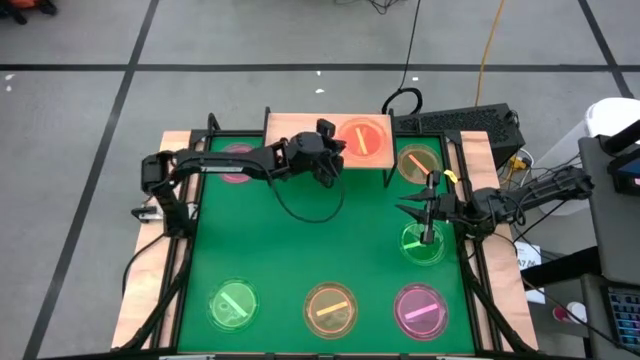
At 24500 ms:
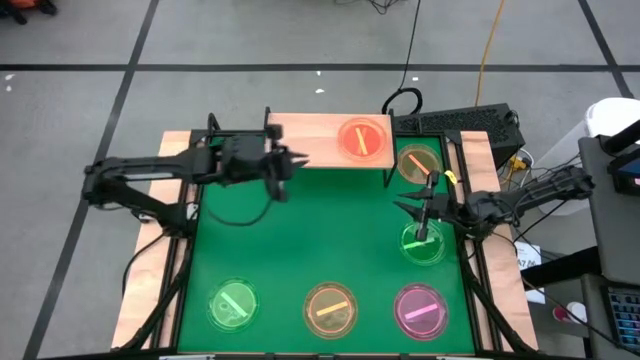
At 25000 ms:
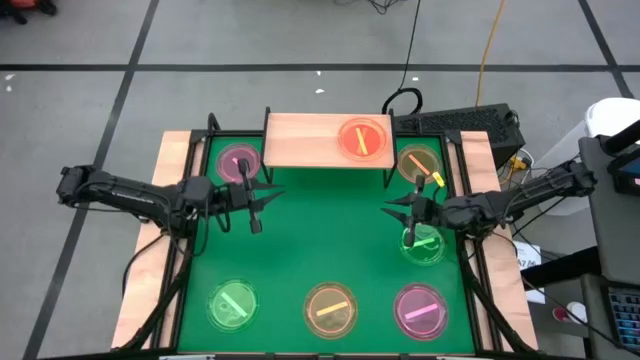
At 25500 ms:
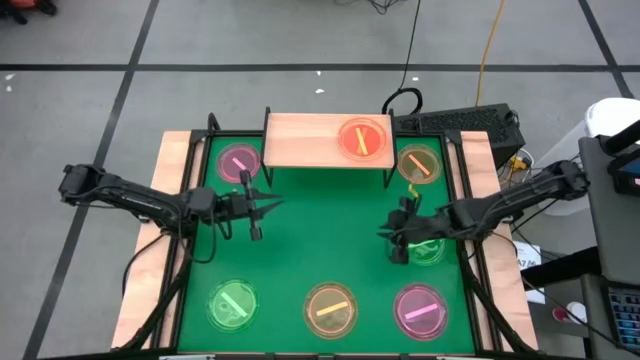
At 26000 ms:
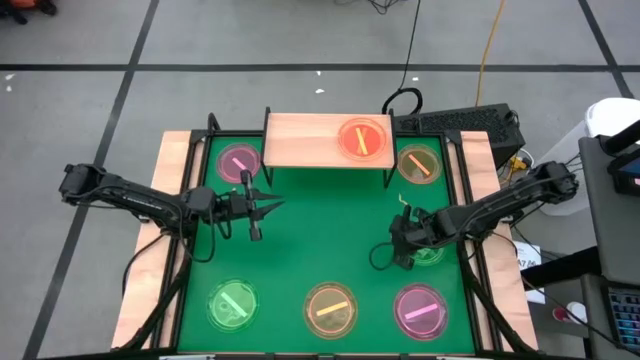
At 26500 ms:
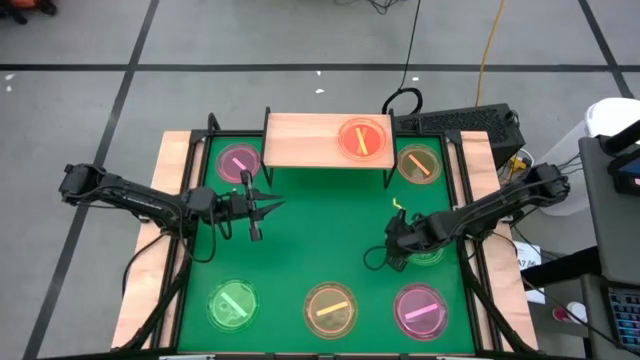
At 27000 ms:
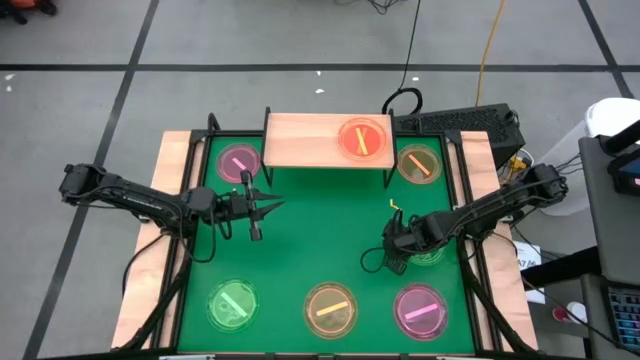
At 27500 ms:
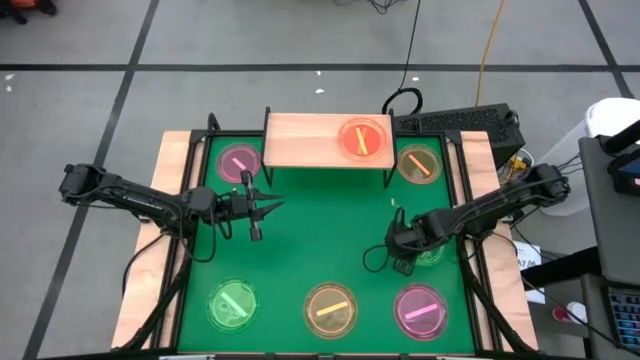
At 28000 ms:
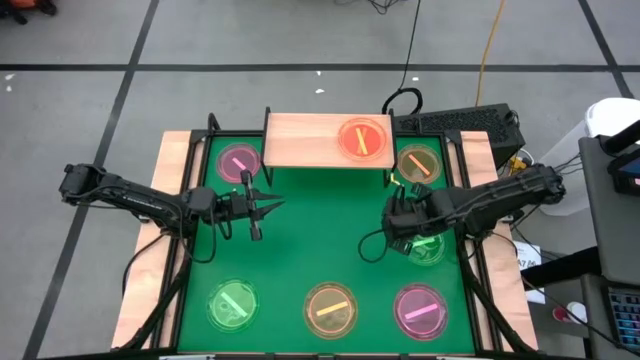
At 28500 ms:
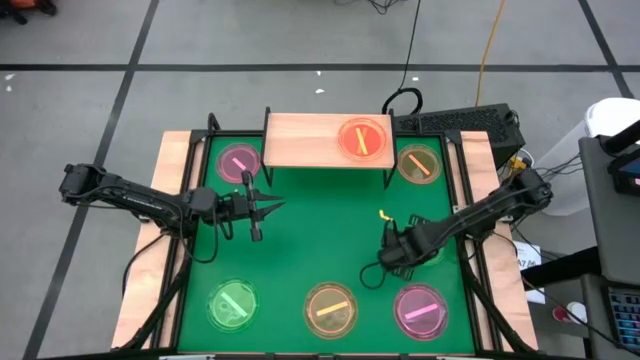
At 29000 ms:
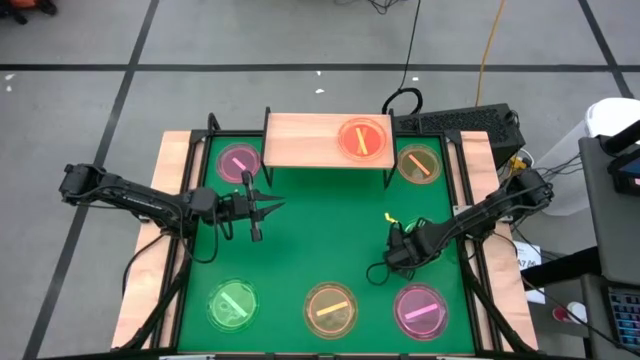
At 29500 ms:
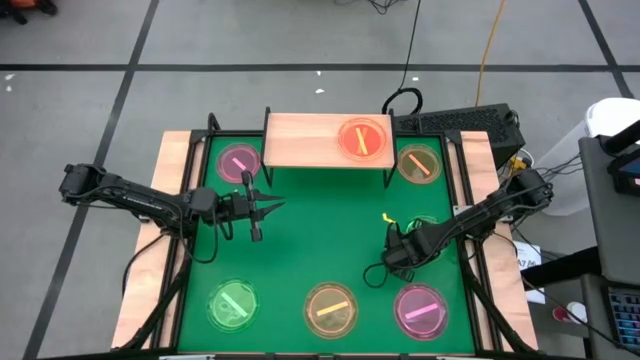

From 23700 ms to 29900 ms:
Task: Place and stack plates onto a shelf
Stack the right green plate on top of the orange plate on the shelf

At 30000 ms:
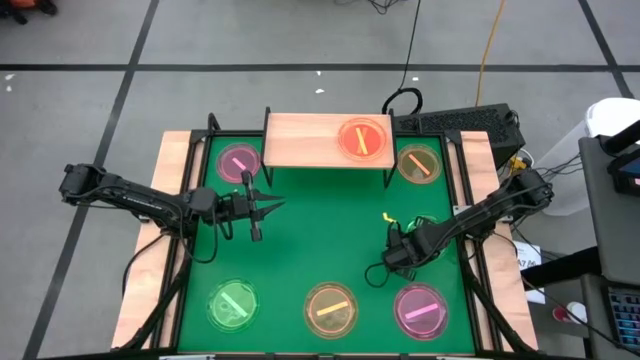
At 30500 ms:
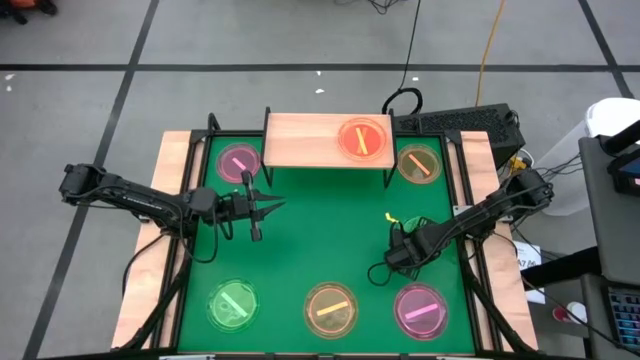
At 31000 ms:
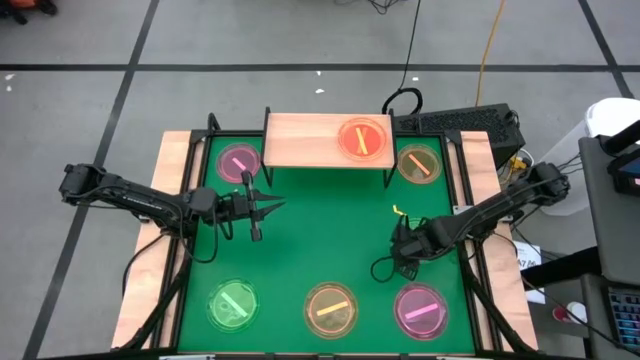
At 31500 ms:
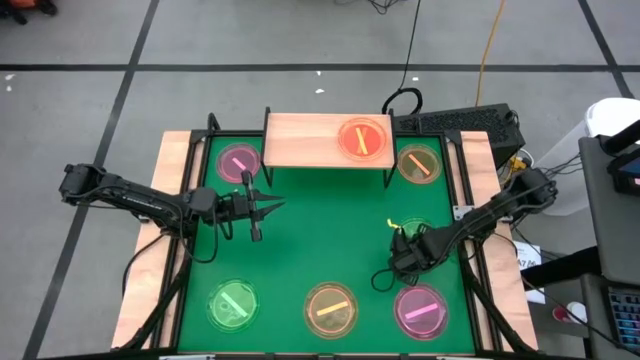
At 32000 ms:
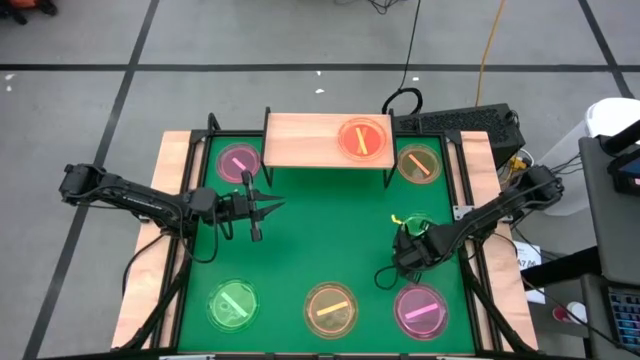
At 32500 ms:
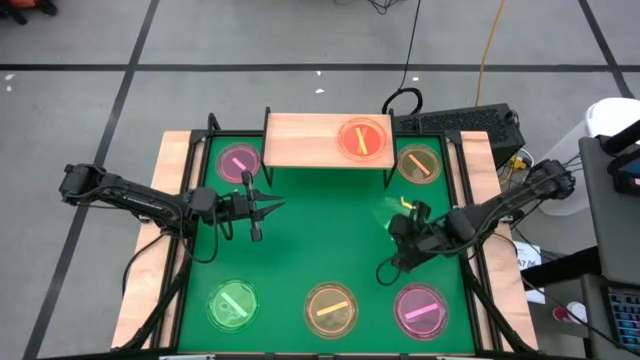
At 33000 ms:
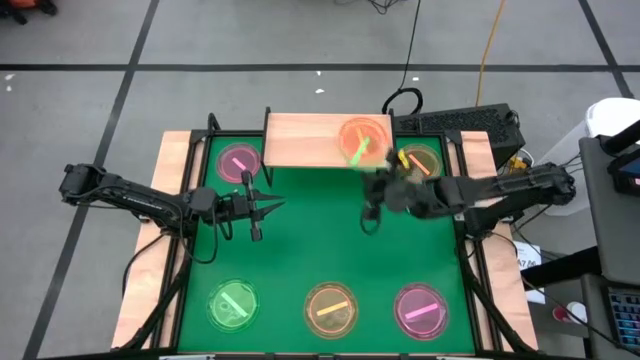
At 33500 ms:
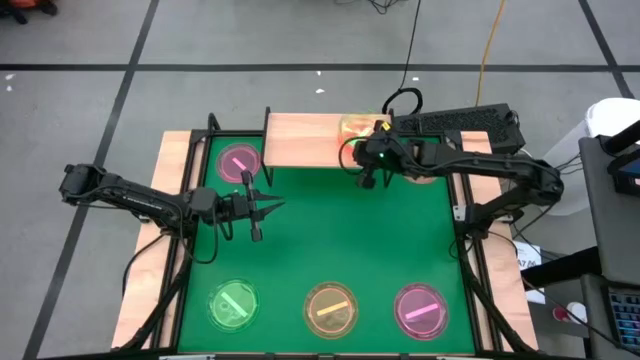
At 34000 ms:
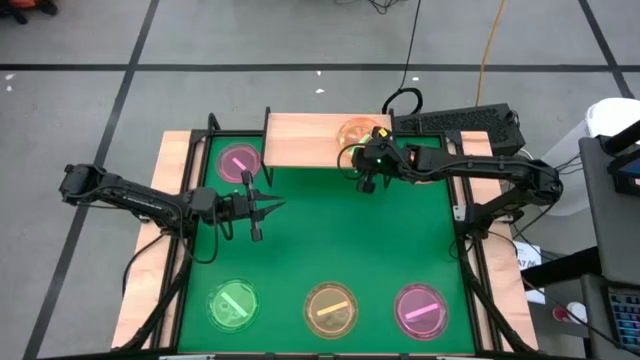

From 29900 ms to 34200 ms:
Stack the right green plate on top of the orange plate on the shelf

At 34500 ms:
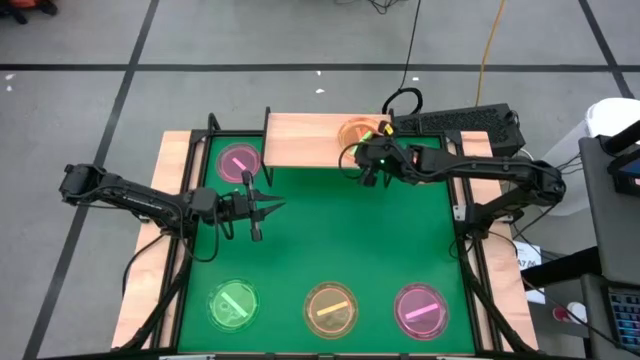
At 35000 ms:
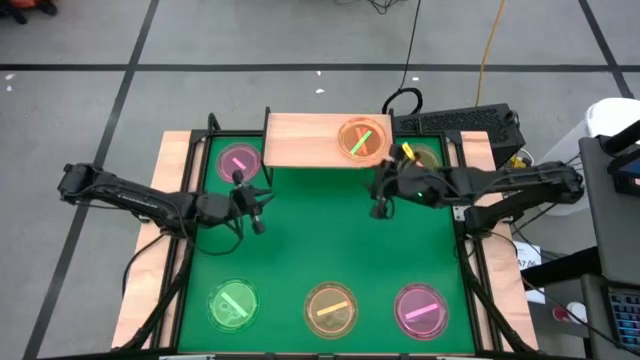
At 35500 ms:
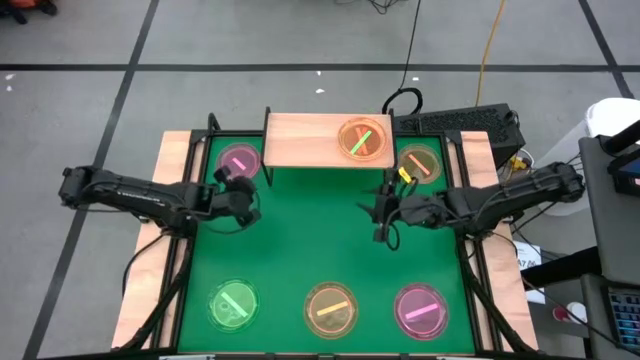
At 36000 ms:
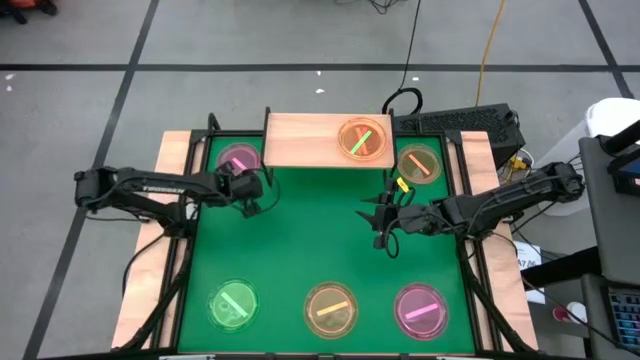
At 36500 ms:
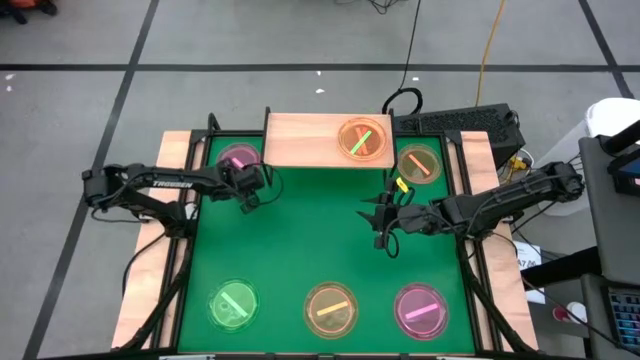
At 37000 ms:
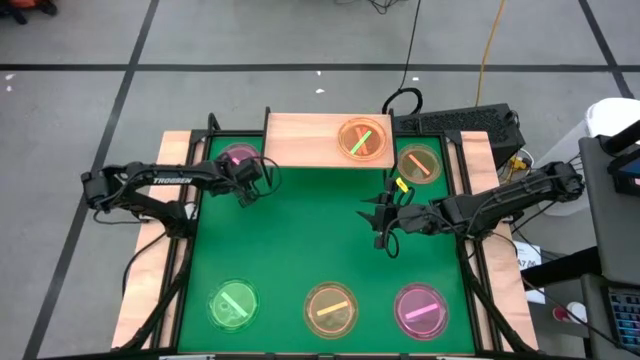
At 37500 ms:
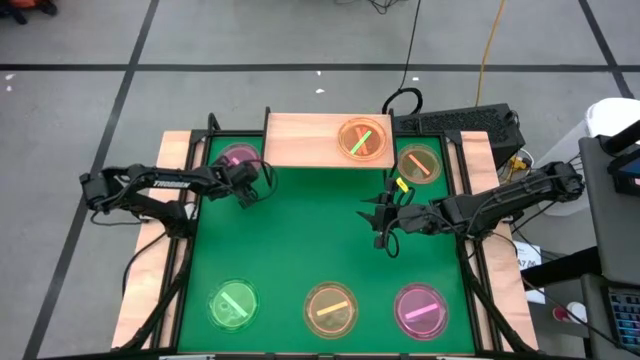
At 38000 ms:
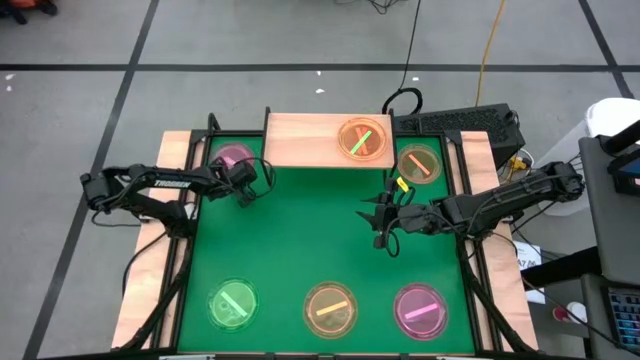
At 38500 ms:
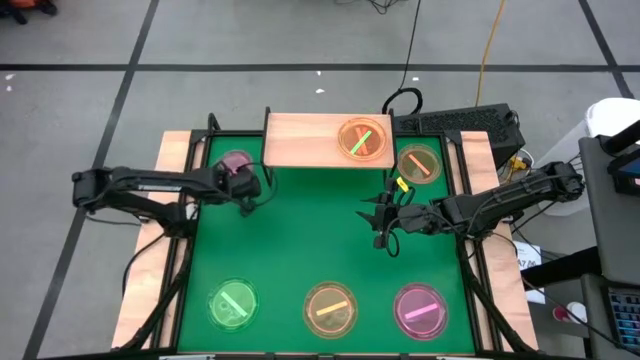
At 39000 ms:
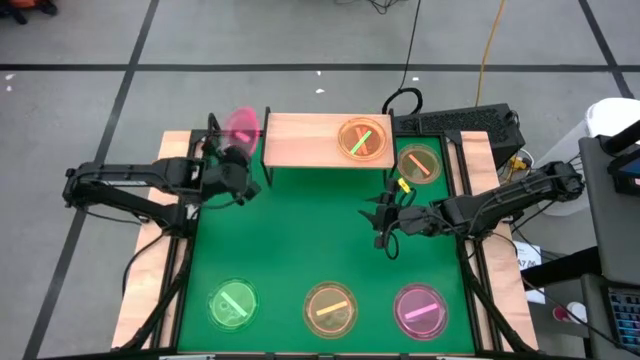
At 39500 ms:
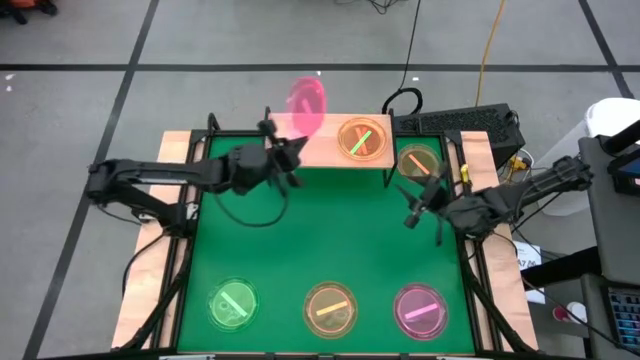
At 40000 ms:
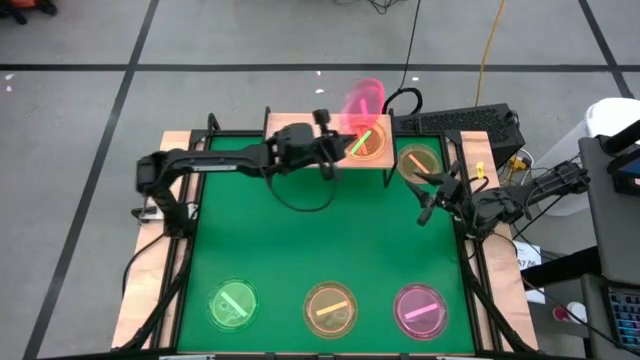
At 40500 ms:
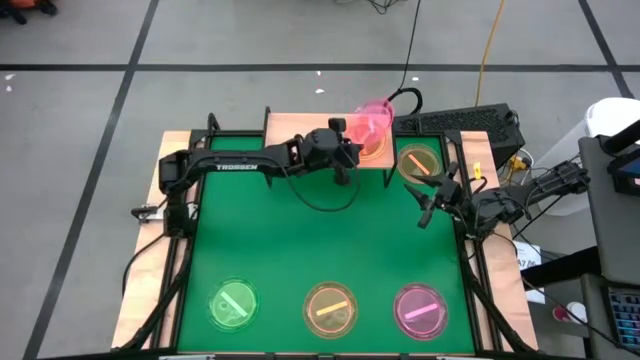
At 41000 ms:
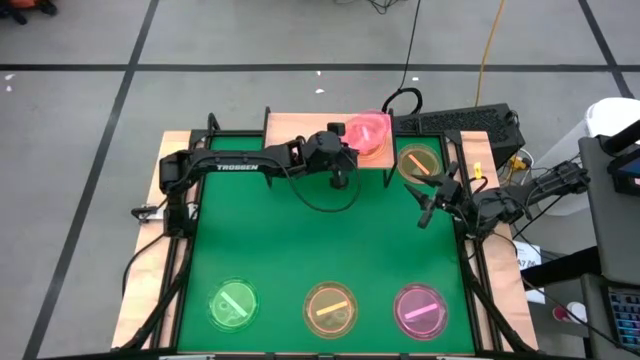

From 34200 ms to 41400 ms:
Stack the top pink plate on top of the orange plate on the shelf

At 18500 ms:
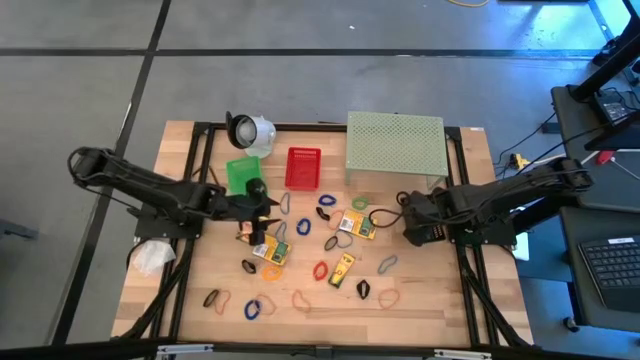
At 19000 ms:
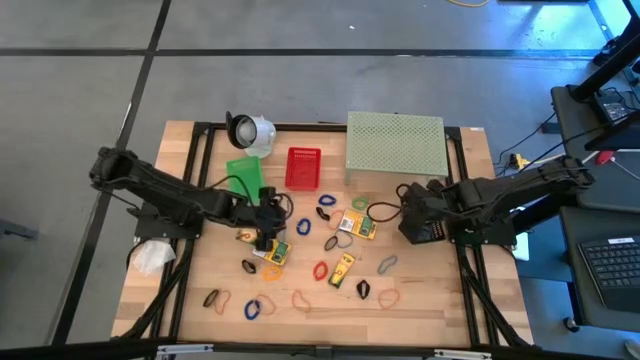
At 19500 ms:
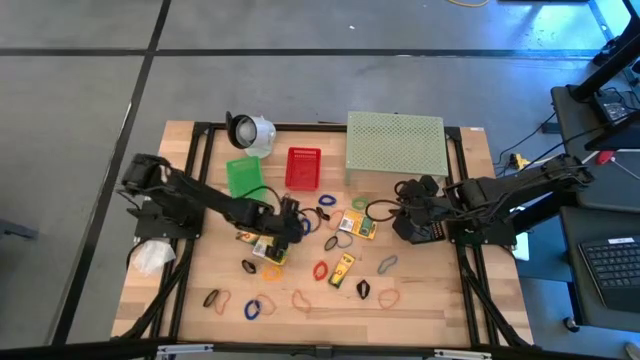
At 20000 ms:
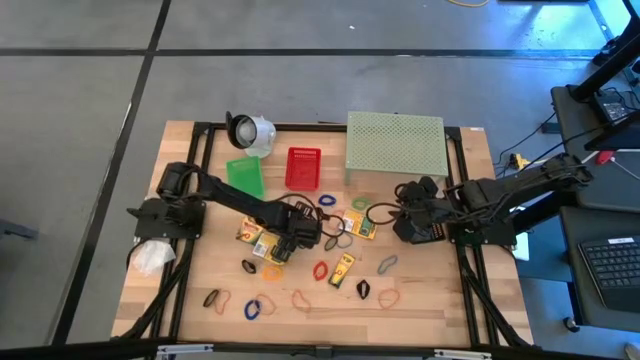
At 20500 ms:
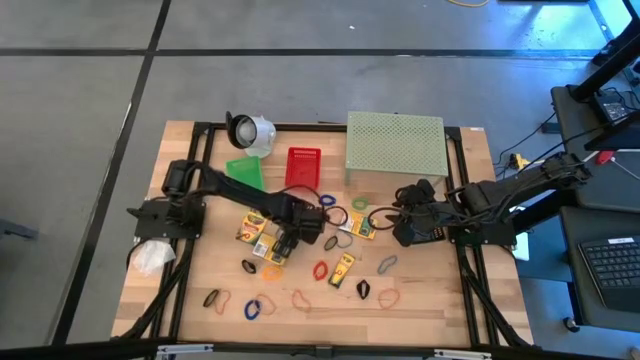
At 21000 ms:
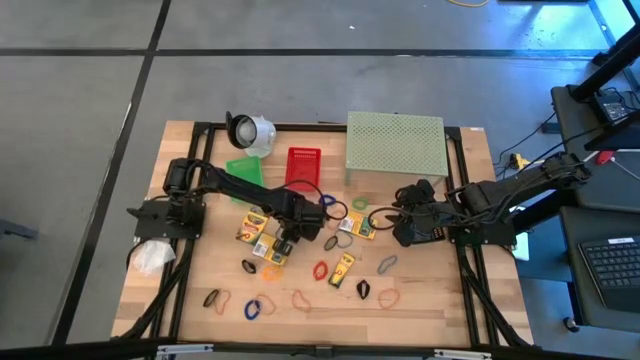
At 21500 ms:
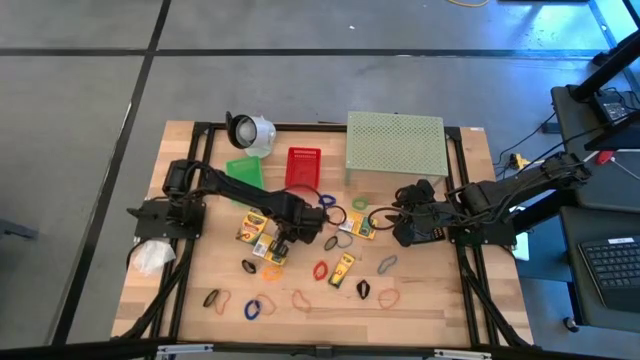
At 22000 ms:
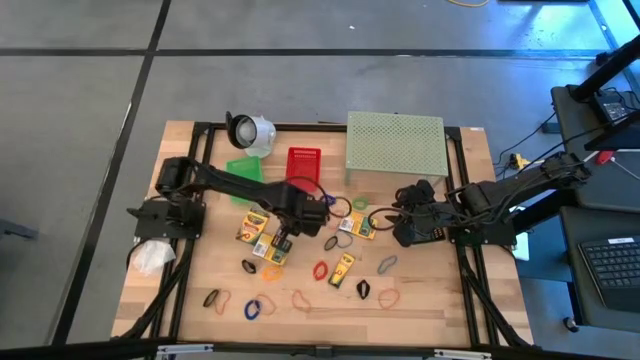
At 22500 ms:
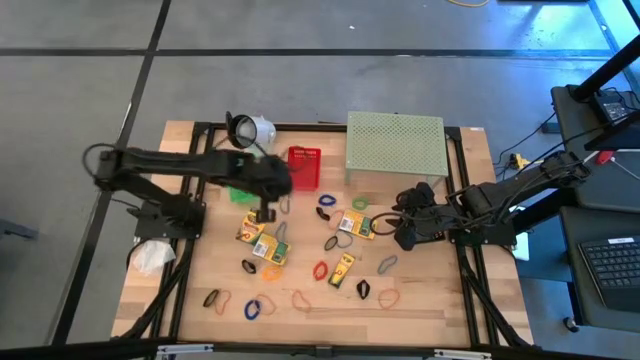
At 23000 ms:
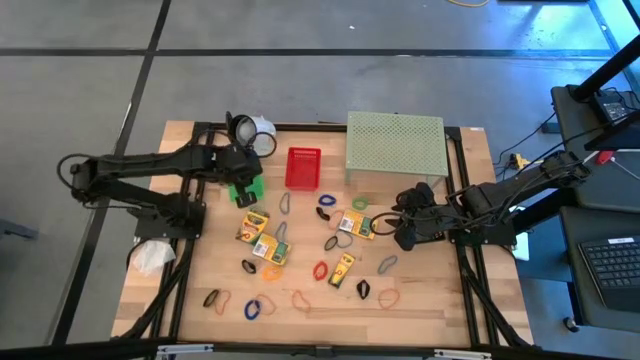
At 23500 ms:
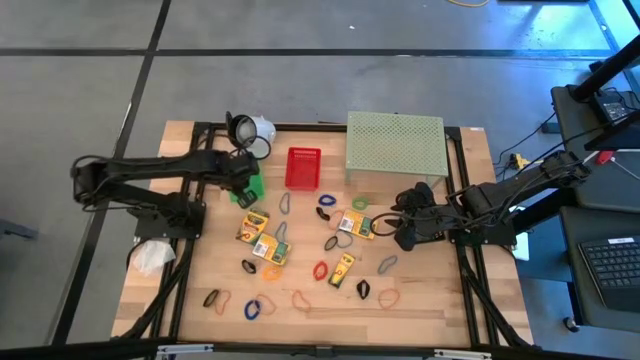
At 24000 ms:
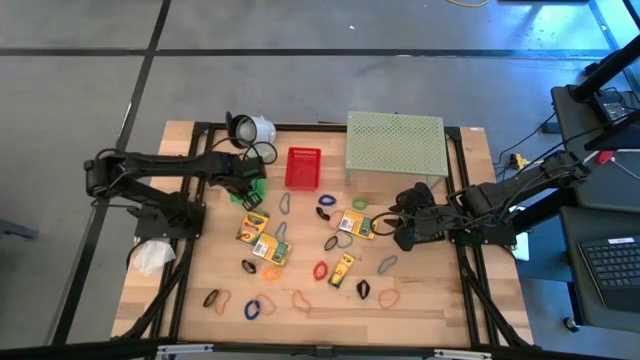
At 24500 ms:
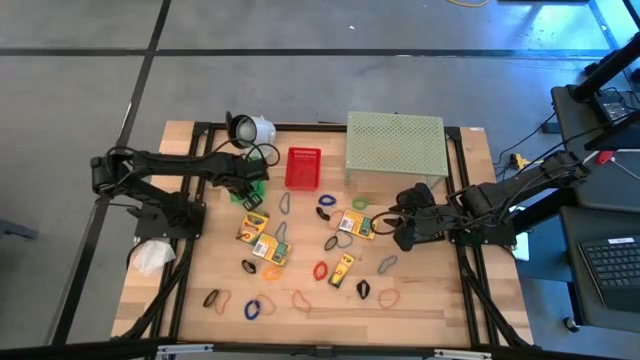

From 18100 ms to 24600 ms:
Task: Pick & Place Office Desk Supplies
Put the blue spring keychain into the green basket
